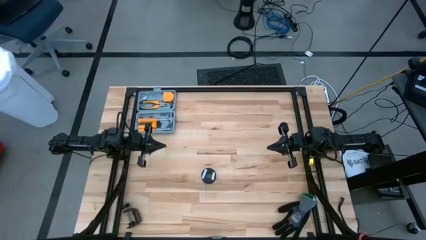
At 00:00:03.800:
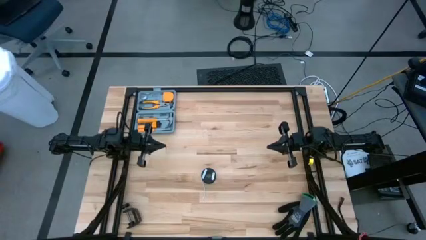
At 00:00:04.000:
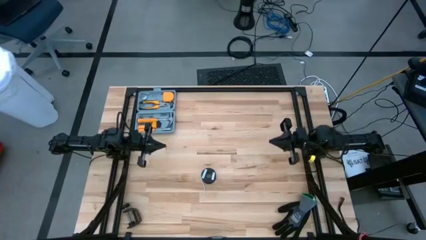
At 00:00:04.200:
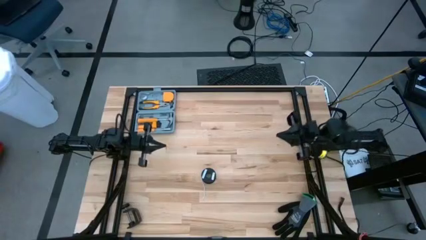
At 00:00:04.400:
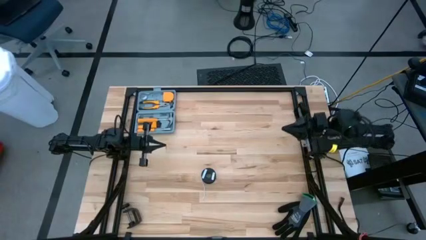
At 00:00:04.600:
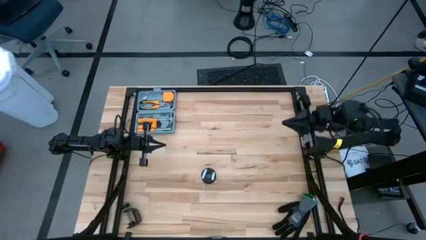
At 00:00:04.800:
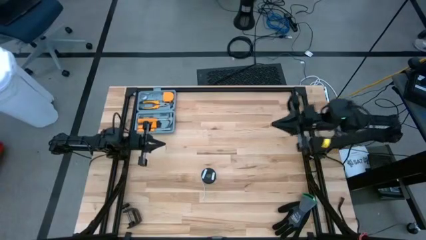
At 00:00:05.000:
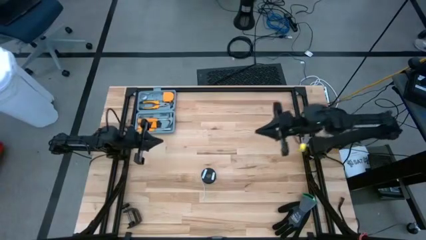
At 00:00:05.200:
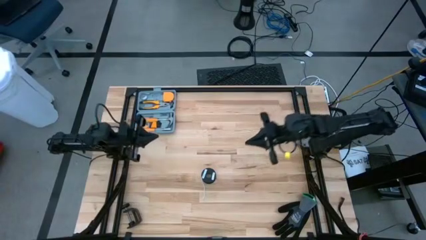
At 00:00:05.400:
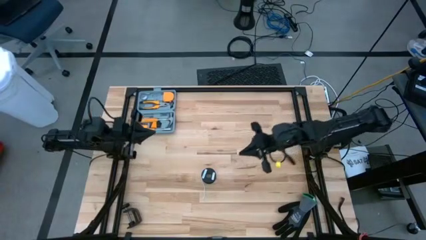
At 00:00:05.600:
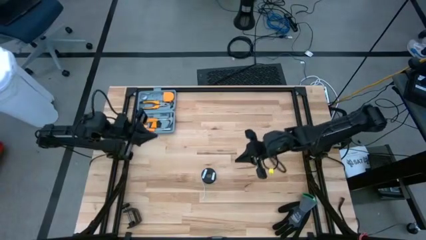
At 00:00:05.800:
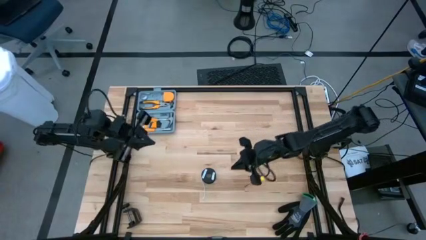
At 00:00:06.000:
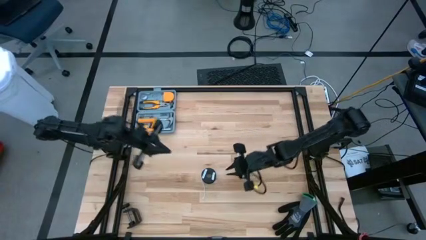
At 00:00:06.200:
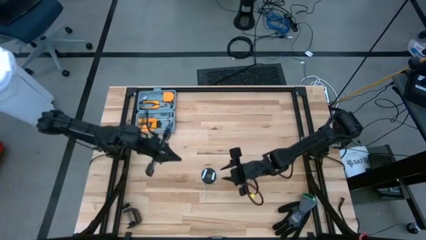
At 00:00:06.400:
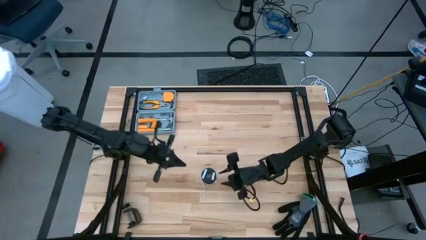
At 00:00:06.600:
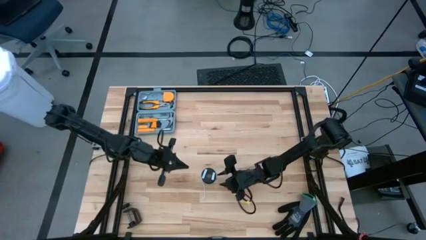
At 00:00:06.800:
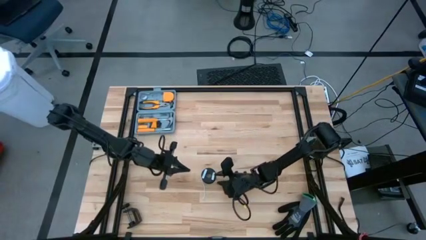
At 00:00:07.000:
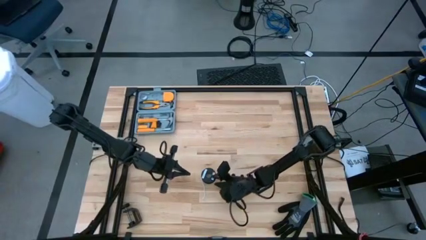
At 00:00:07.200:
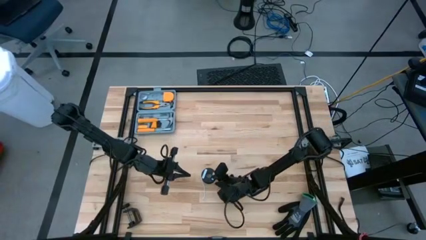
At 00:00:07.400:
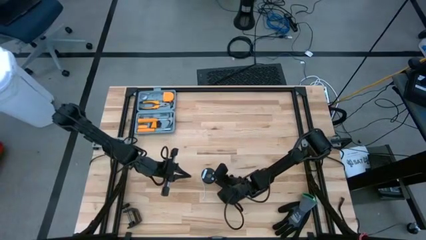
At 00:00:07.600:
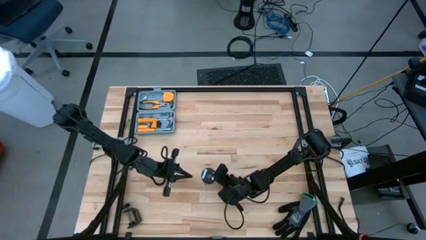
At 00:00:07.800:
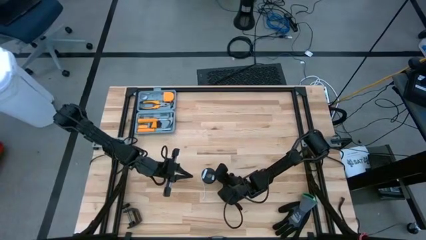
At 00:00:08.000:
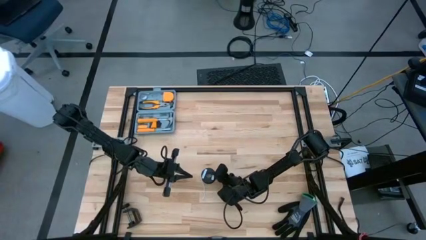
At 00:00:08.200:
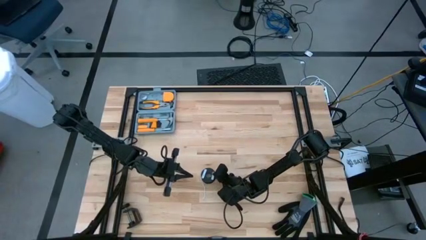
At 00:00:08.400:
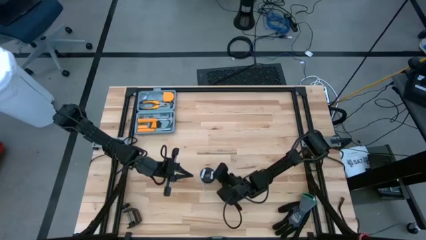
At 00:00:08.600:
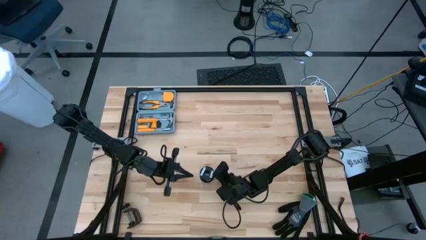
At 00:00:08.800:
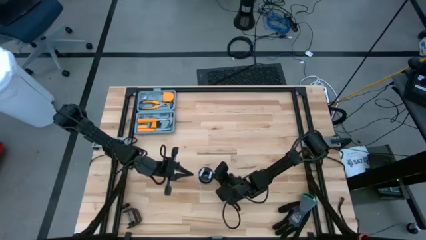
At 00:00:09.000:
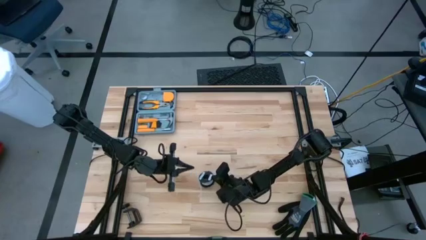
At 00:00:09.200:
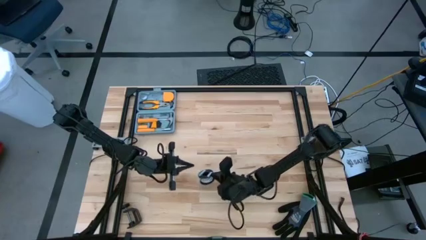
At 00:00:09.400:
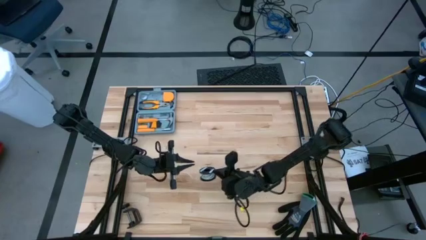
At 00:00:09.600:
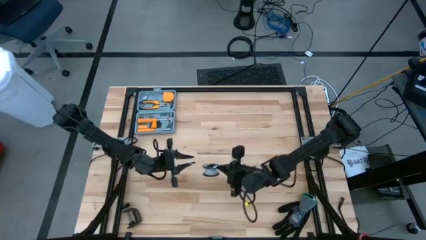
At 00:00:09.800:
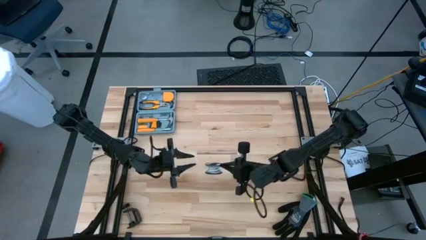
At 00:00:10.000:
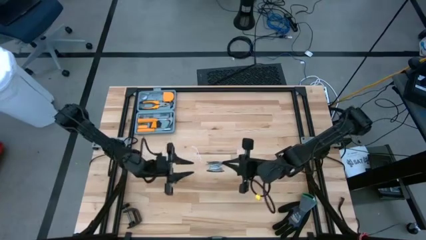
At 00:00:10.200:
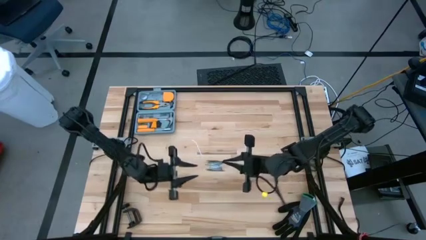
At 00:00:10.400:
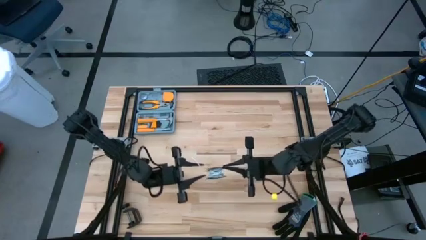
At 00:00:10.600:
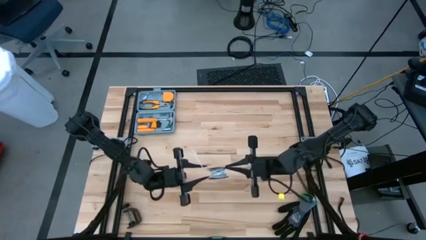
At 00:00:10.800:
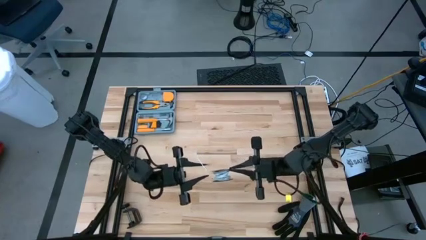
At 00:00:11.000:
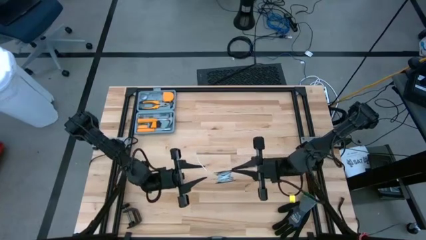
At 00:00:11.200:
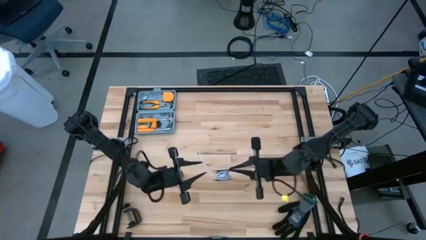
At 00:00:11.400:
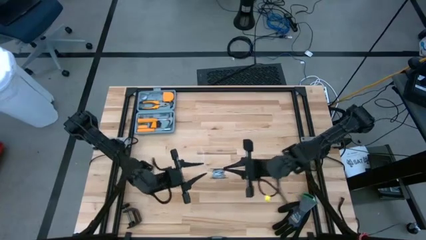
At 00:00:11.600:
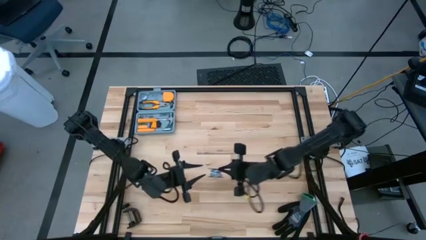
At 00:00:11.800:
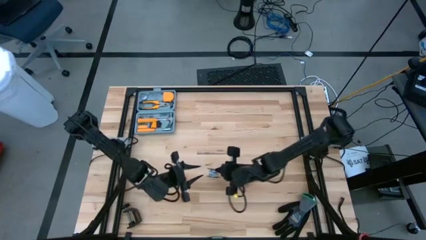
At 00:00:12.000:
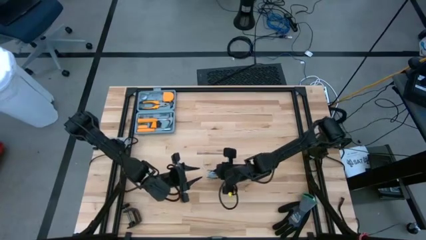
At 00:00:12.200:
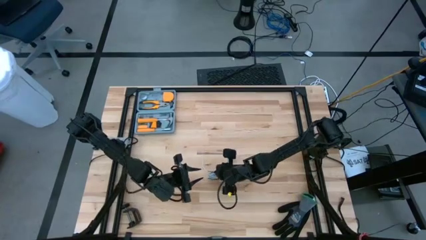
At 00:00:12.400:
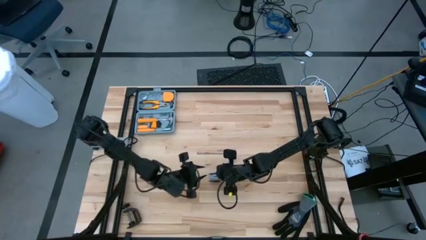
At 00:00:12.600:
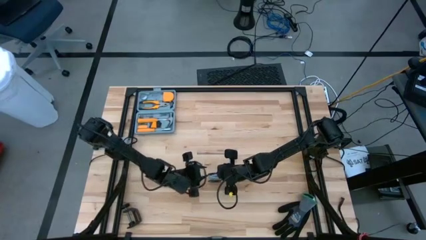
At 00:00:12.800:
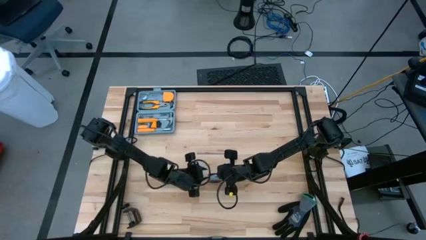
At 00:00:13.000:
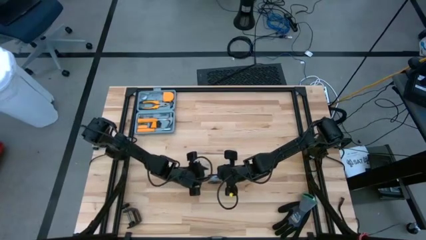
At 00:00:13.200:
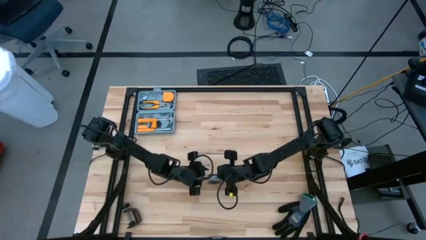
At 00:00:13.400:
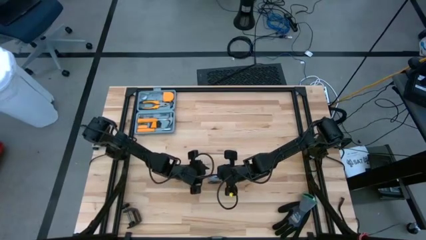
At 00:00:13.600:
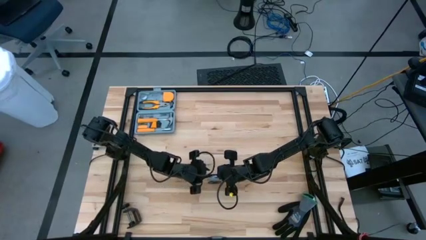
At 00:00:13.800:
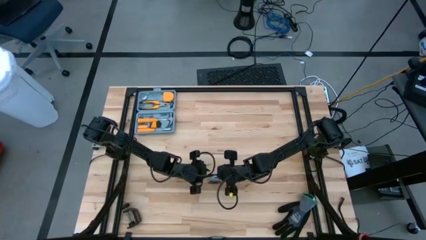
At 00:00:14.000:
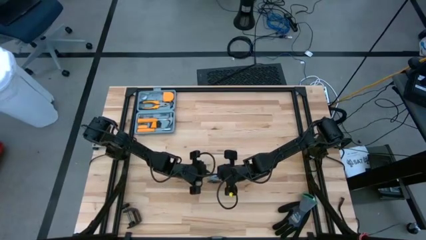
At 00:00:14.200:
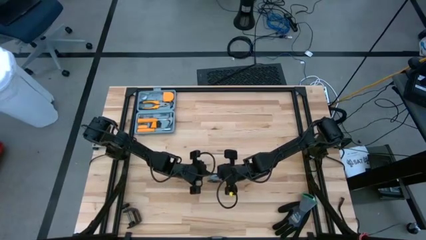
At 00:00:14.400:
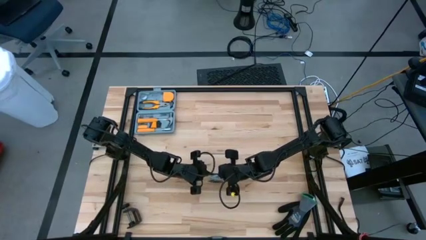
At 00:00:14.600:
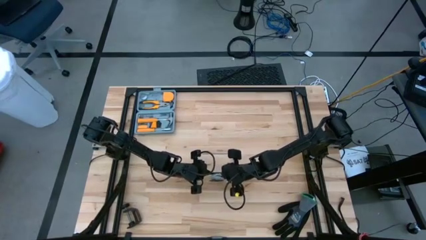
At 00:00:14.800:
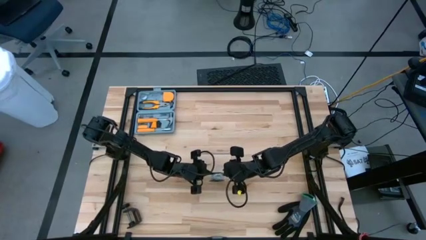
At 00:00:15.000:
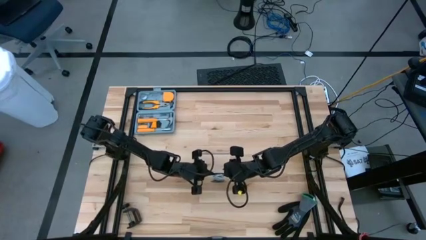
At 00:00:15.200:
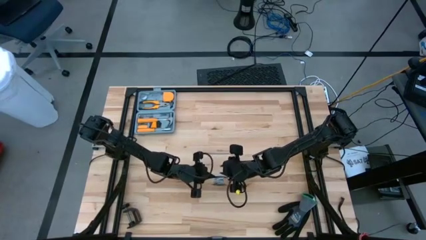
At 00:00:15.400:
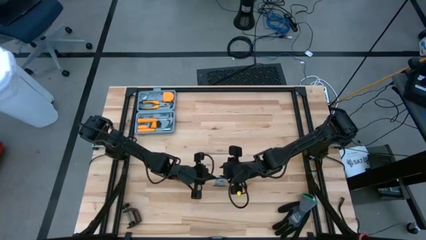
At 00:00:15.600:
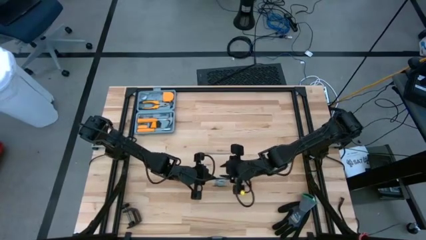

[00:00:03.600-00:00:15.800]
Task: Coil cords
Uncoil the white wire from the spool
